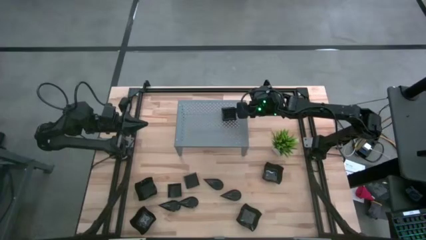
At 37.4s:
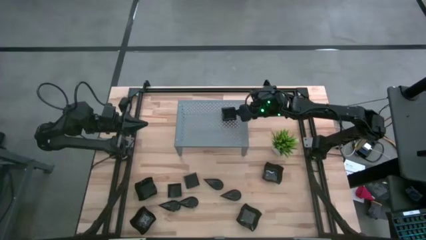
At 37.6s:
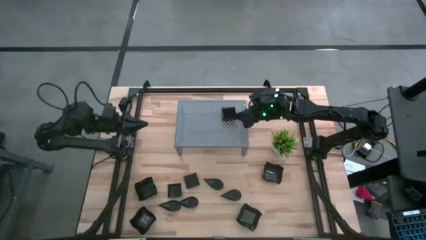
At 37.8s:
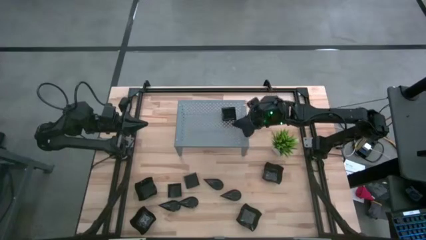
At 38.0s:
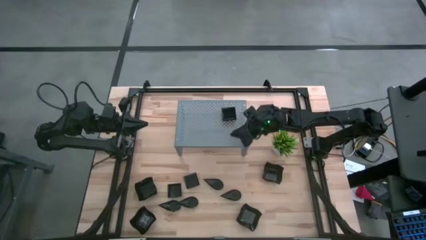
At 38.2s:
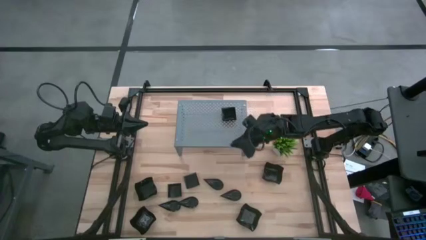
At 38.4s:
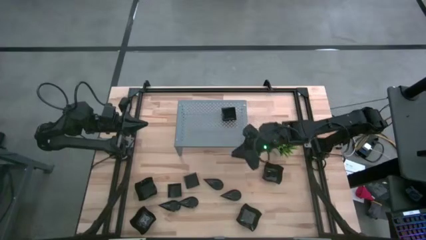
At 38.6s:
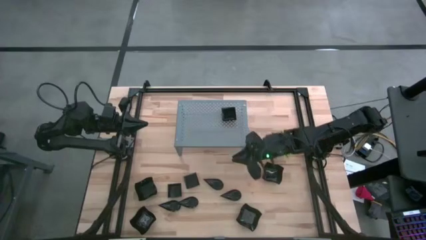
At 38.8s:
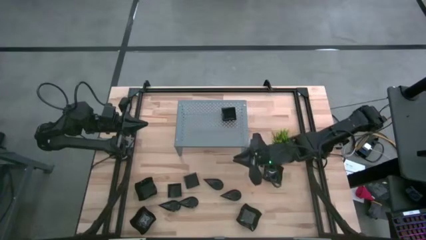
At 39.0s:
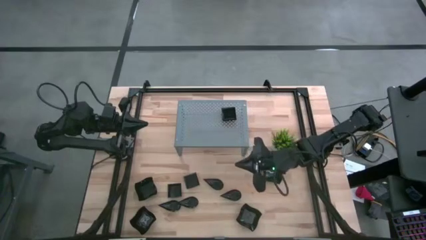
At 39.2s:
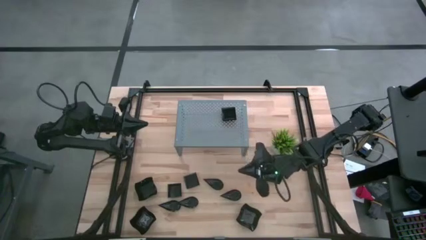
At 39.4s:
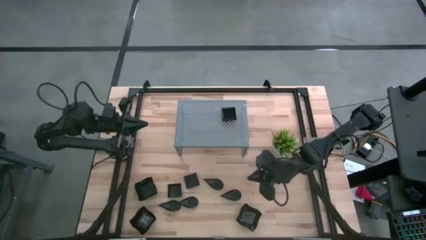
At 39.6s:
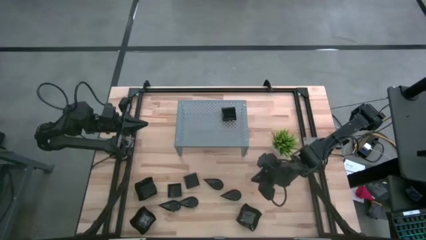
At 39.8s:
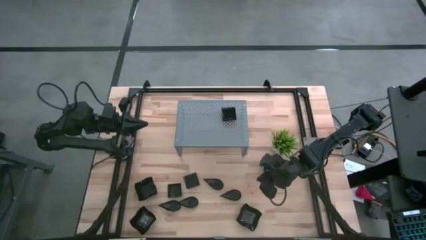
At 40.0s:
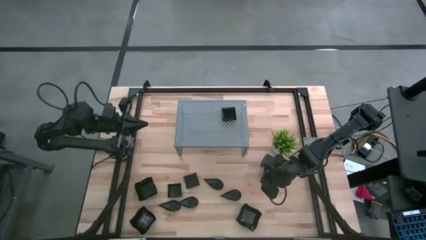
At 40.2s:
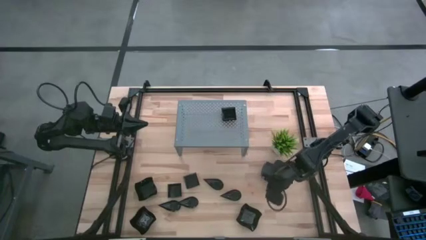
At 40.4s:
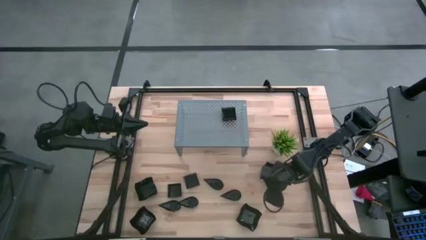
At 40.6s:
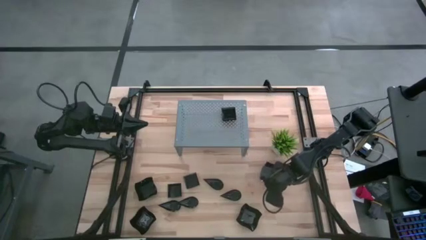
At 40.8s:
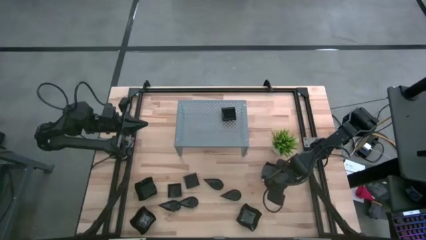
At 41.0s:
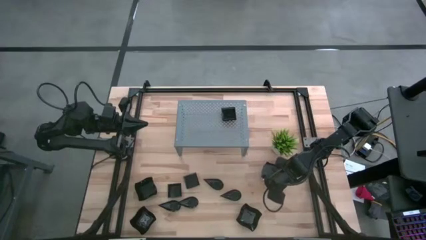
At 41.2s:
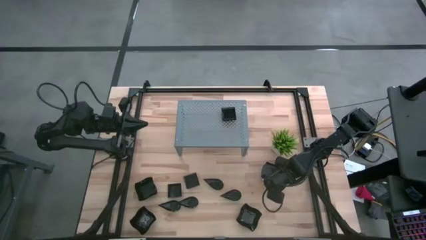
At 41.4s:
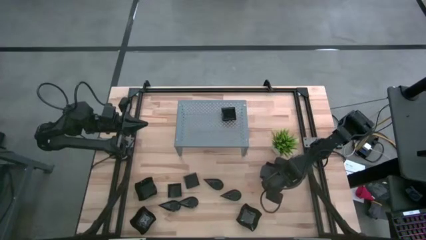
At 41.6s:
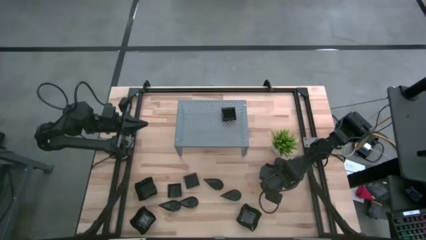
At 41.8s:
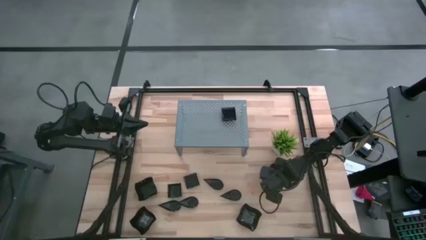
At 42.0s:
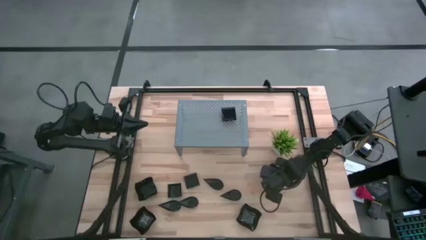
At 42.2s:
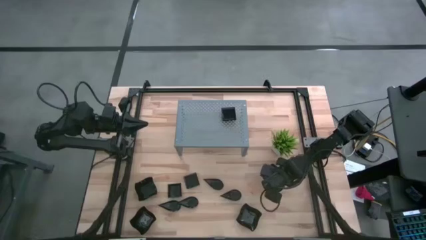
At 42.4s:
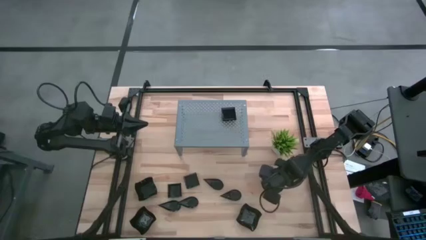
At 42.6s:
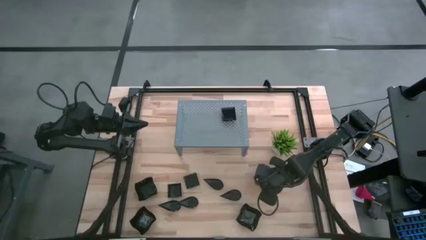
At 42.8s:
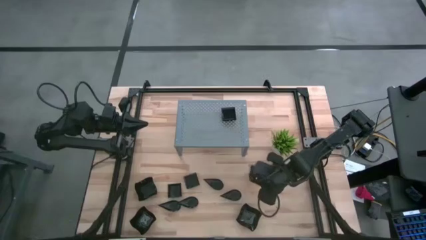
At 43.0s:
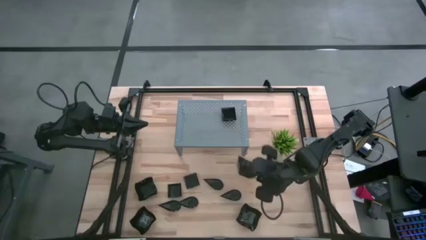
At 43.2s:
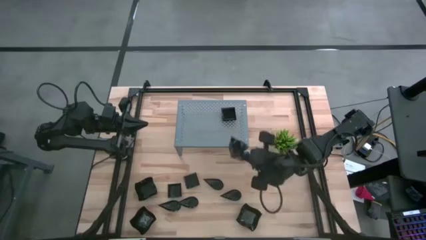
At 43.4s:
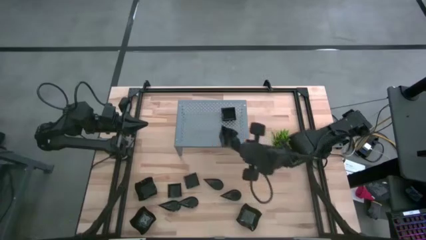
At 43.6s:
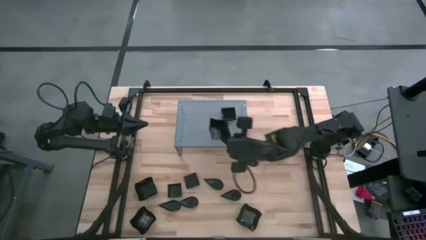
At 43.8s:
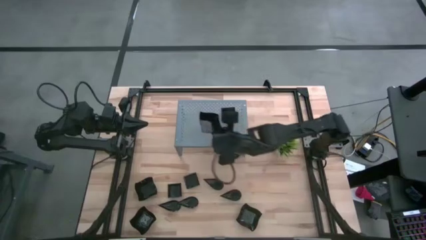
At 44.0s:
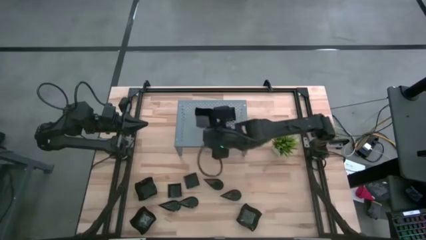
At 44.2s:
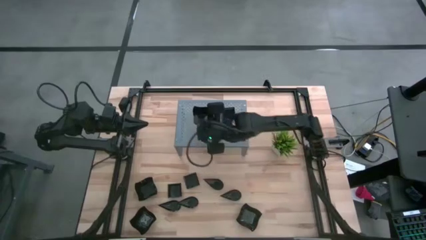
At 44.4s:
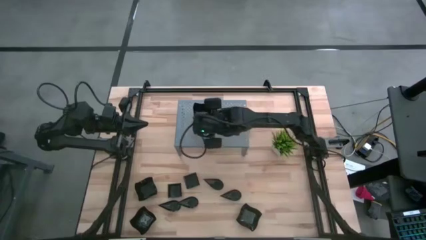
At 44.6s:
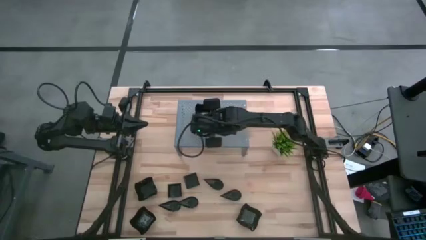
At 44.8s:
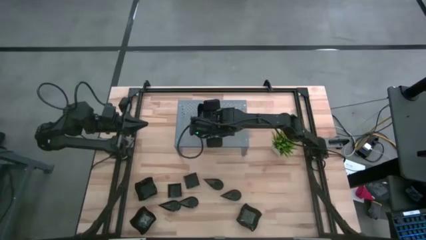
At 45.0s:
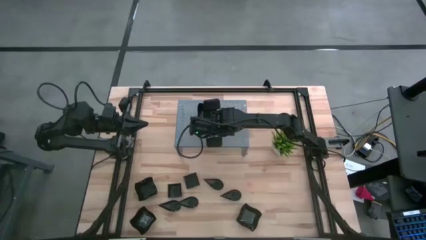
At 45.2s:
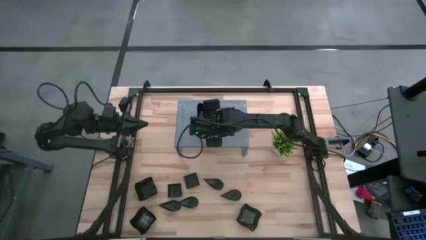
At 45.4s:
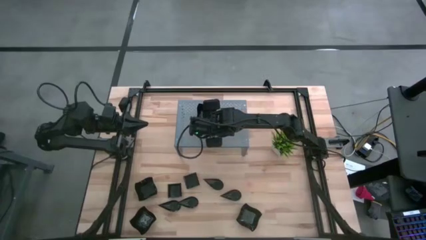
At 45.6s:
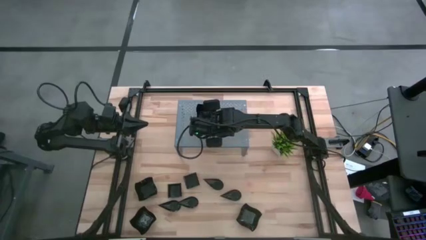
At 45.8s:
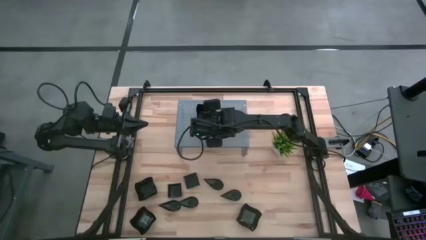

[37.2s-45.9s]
Task: Pick & Place Mini shaped plates
Put the distorted square plate on the shelf

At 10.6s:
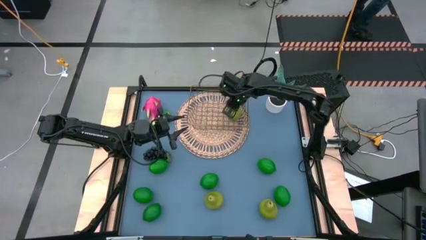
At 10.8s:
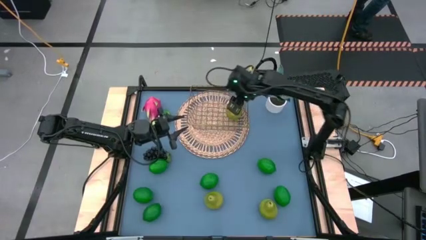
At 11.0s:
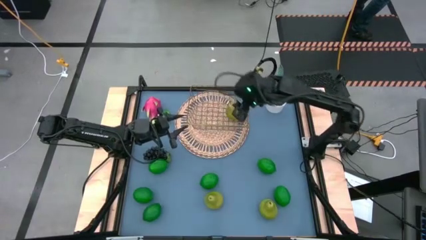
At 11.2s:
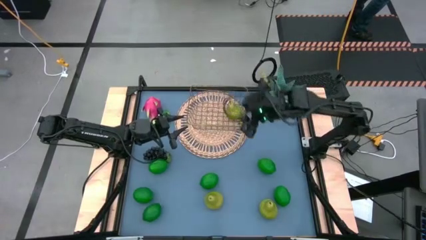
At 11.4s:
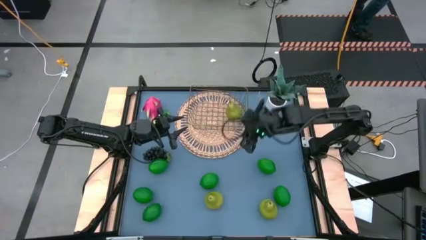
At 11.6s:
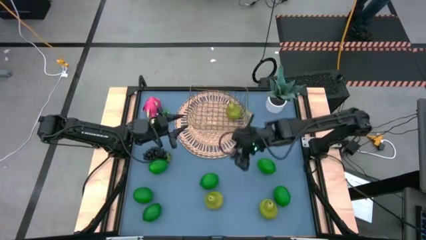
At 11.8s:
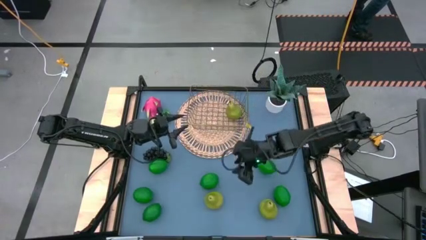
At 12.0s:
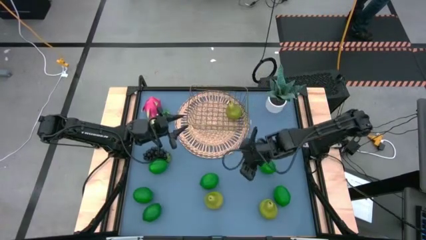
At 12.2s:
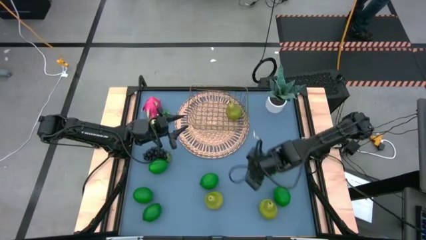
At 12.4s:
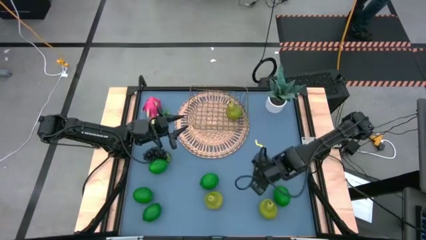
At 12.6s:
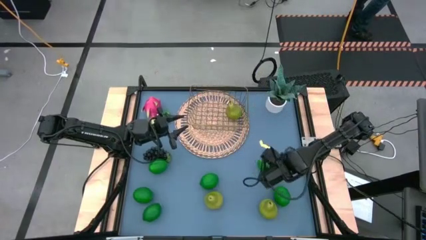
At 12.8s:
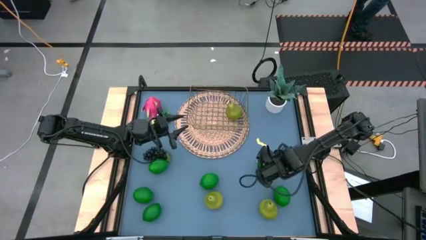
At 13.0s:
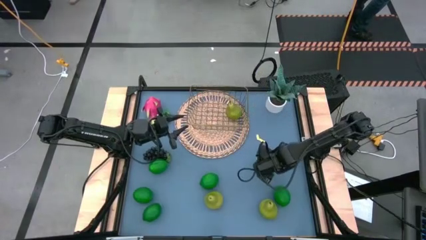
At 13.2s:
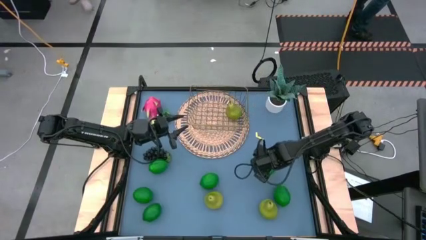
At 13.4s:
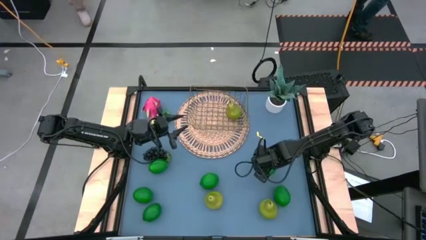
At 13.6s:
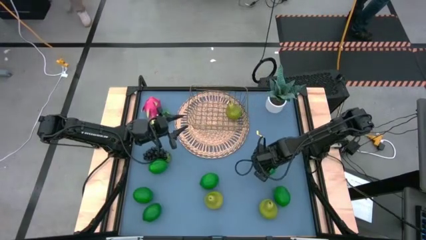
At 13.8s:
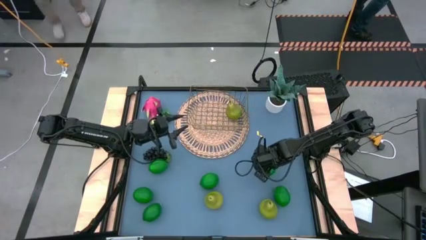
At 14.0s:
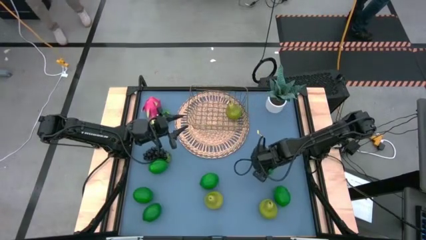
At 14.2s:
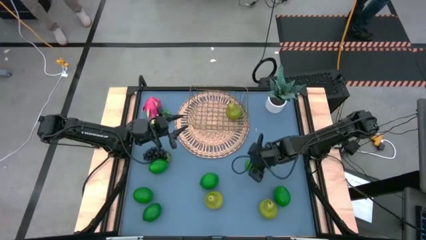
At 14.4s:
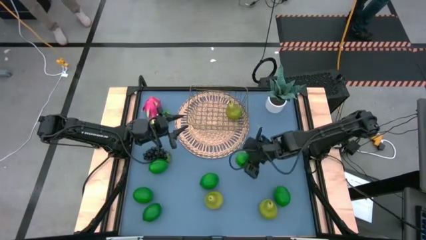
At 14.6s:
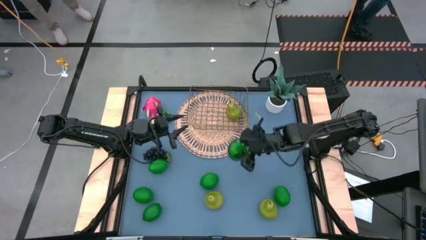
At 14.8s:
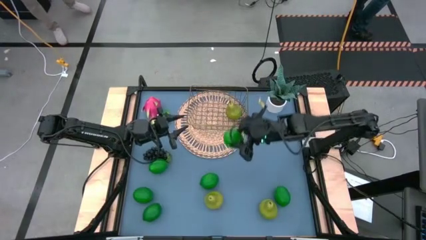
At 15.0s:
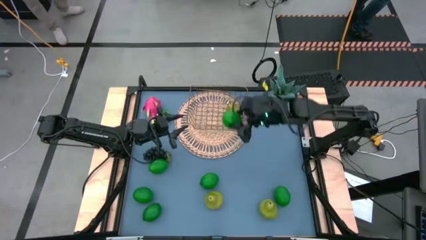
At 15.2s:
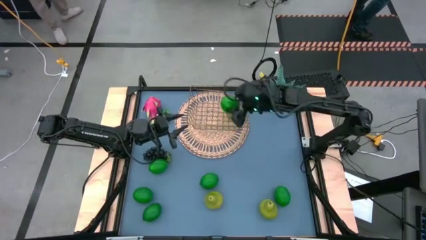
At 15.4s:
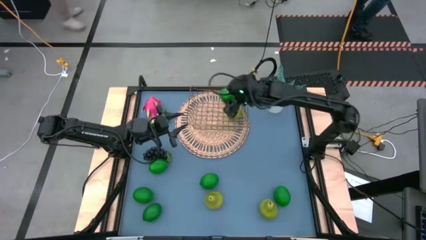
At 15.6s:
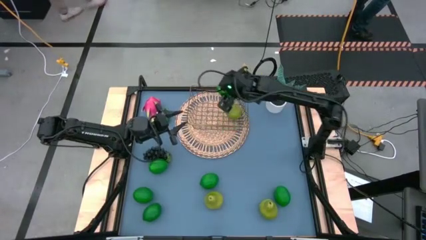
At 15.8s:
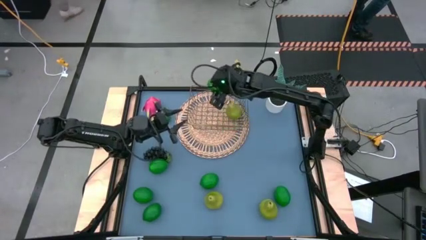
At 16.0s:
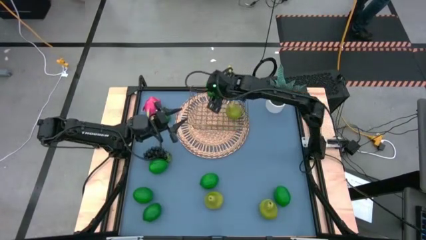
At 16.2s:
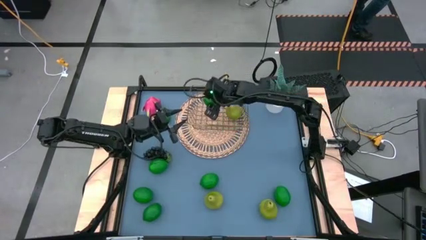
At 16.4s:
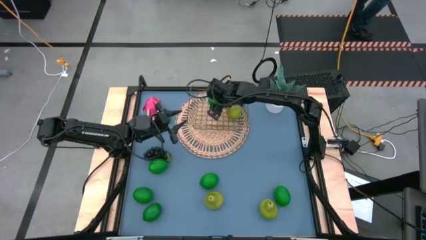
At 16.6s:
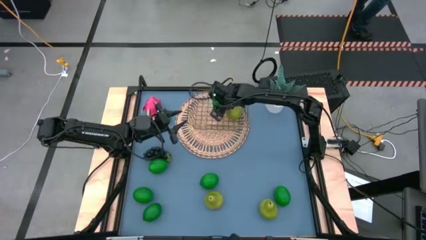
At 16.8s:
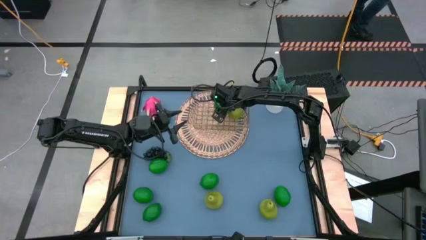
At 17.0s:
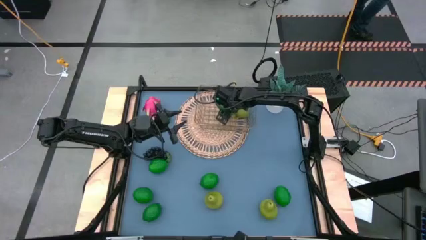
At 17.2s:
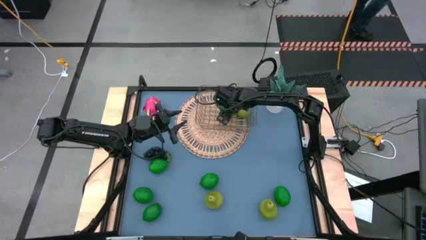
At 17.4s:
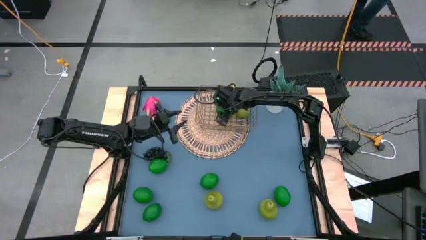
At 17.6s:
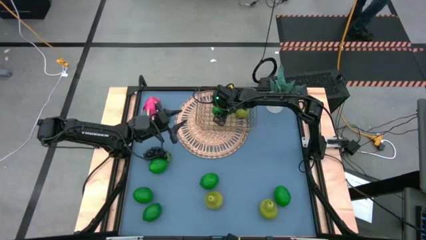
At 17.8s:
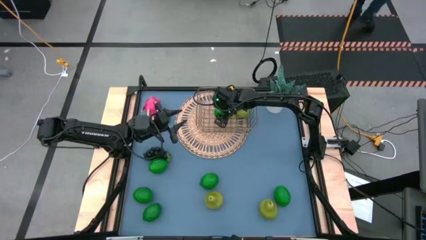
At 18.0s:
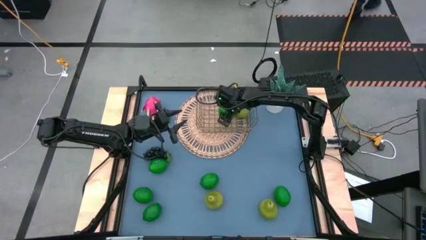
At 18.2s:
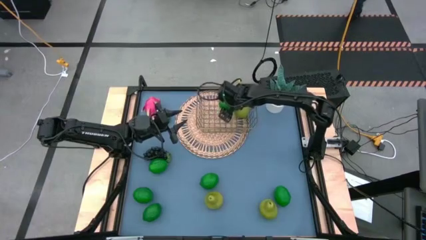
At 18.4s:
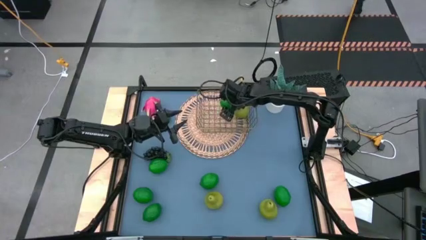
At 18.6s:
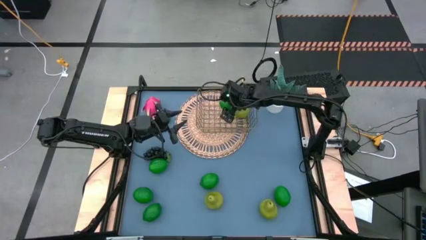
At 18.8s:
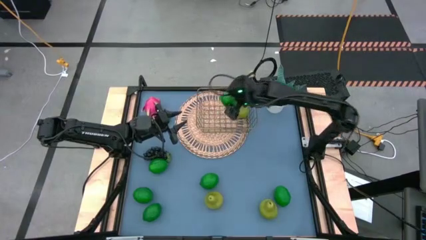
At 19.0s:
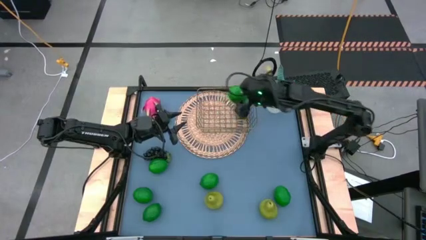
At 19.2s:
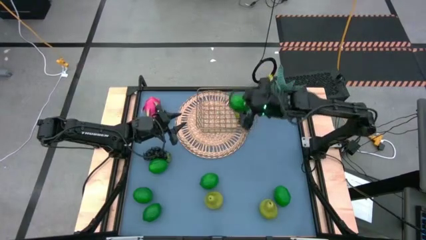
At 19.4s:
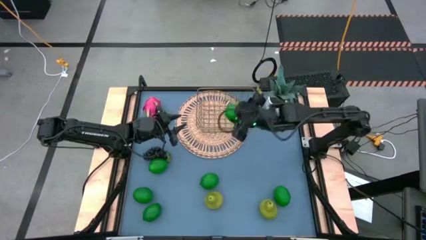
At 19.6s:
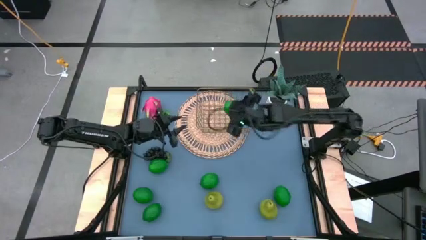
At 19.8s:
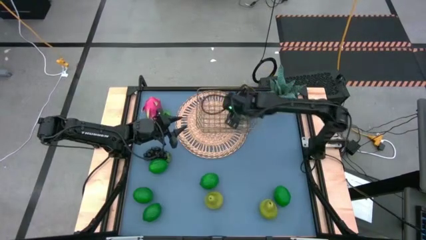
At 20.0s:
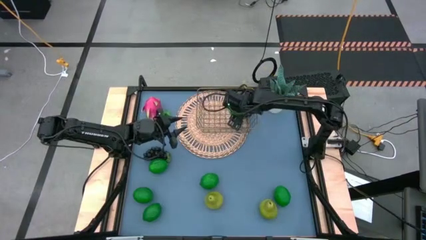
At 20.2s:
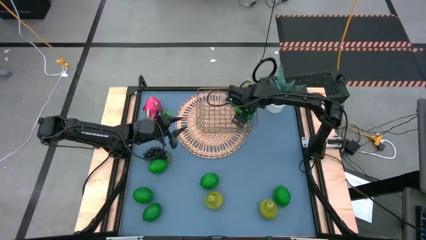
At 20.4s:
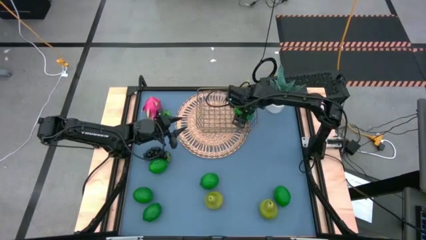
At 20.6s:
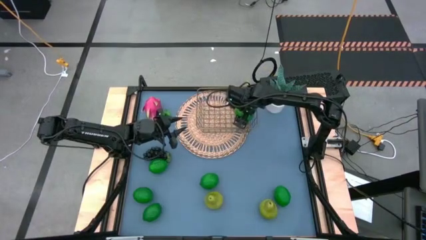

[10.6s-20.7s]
Task: Build produce basket
Put the green lime into the wire basket
